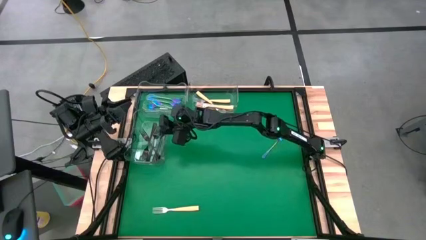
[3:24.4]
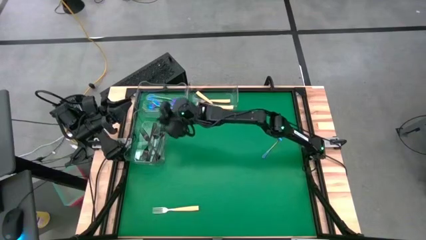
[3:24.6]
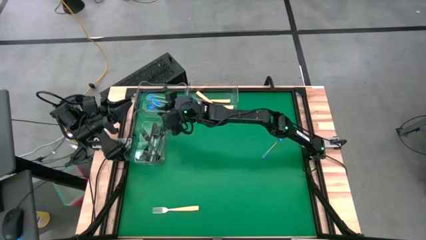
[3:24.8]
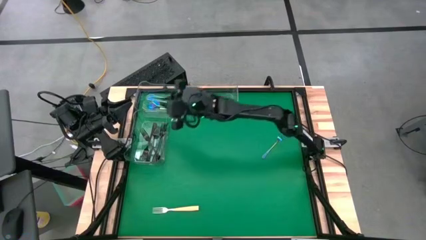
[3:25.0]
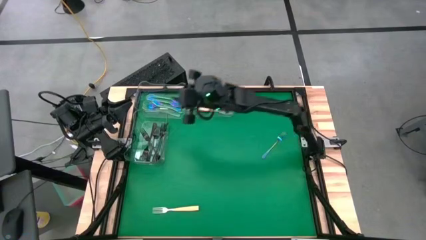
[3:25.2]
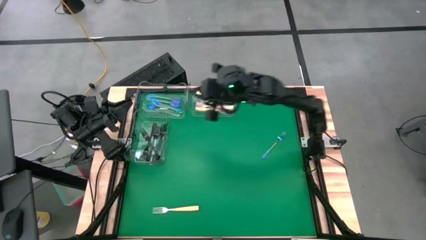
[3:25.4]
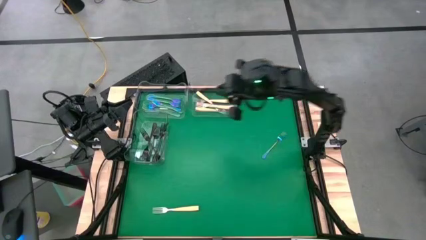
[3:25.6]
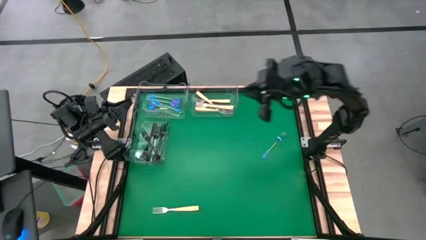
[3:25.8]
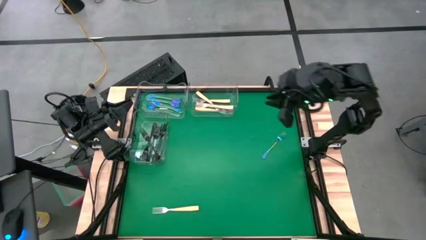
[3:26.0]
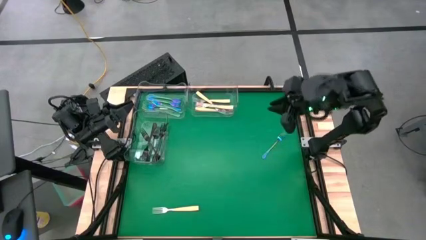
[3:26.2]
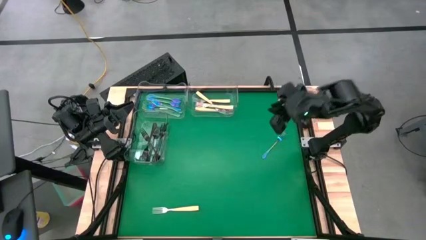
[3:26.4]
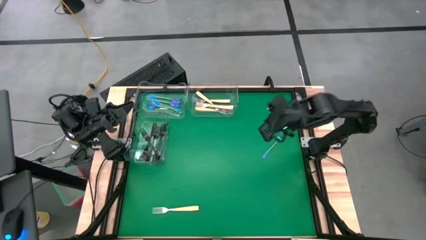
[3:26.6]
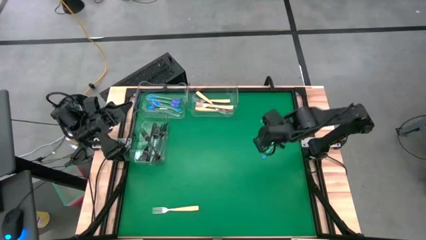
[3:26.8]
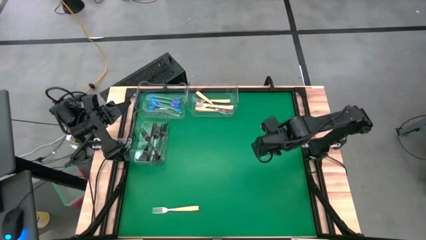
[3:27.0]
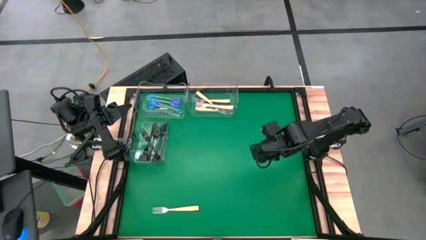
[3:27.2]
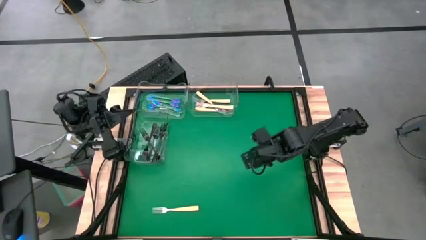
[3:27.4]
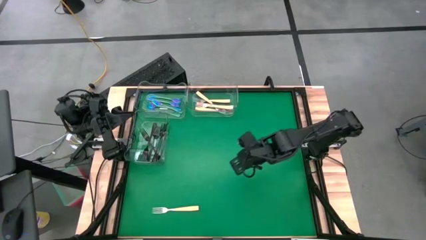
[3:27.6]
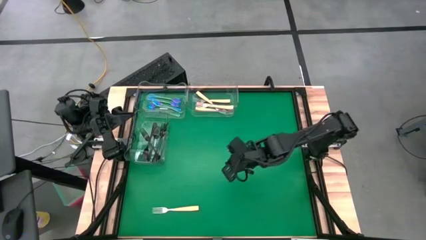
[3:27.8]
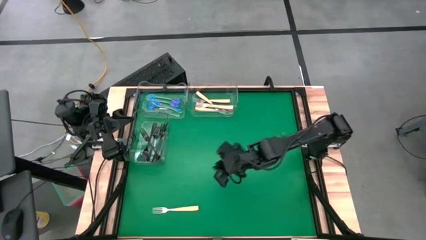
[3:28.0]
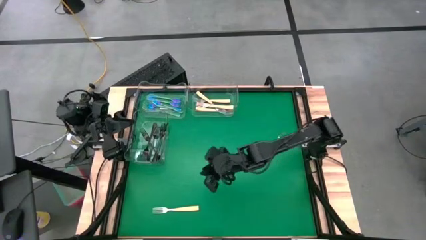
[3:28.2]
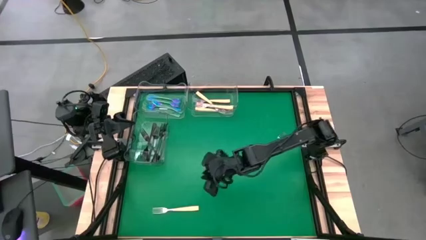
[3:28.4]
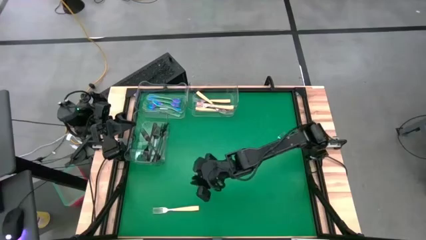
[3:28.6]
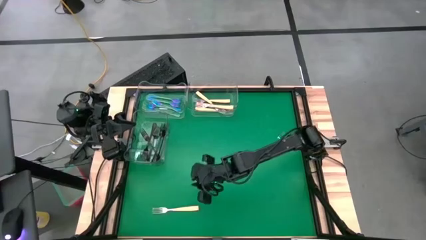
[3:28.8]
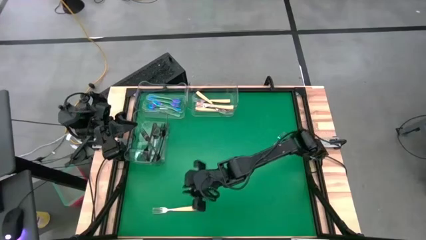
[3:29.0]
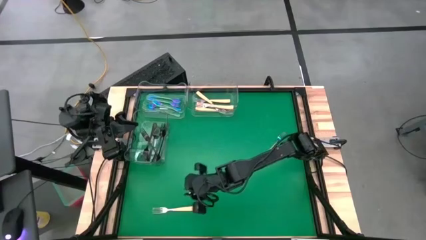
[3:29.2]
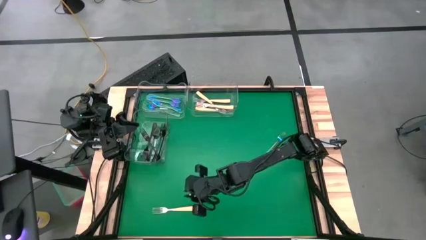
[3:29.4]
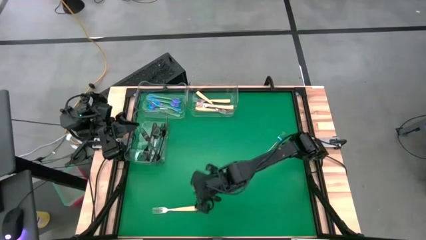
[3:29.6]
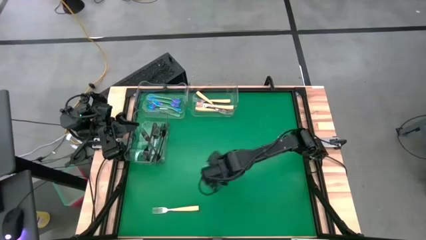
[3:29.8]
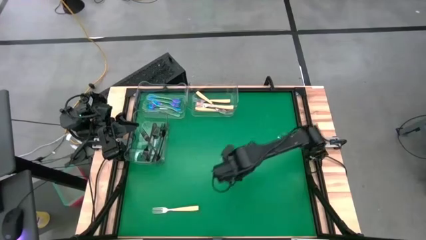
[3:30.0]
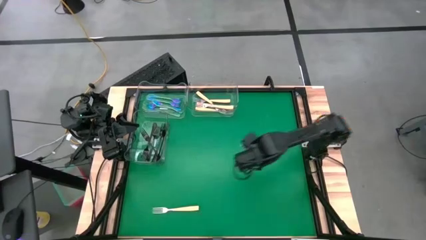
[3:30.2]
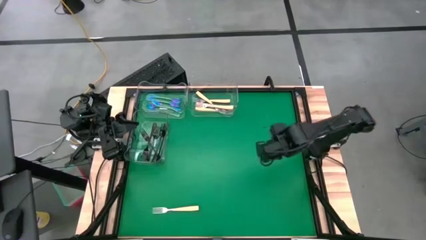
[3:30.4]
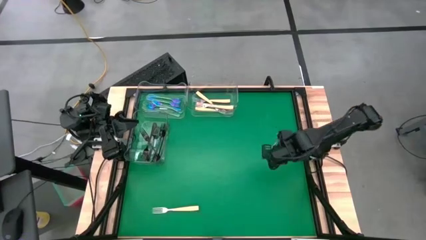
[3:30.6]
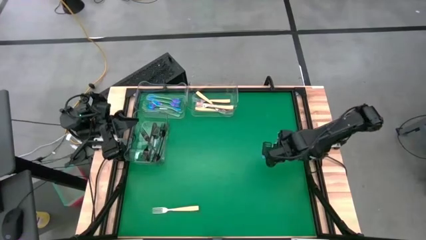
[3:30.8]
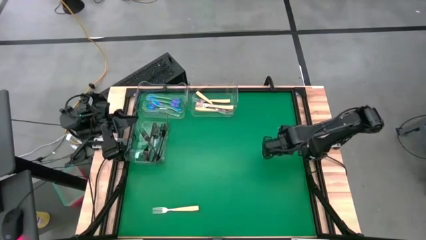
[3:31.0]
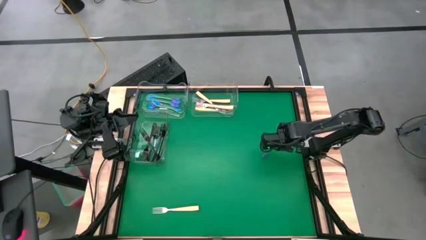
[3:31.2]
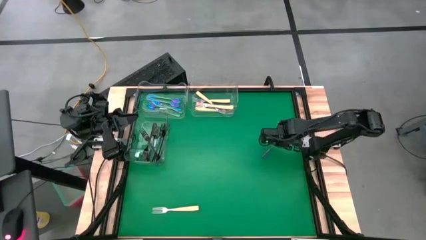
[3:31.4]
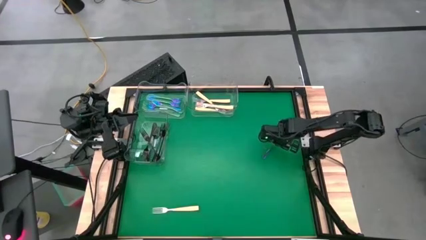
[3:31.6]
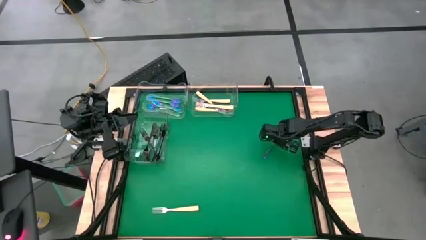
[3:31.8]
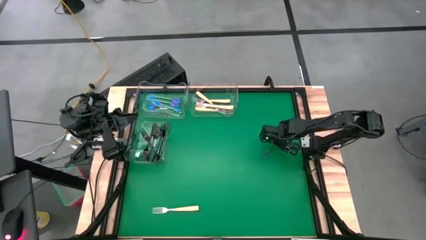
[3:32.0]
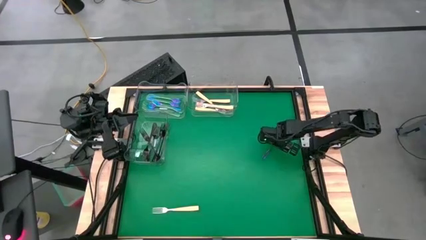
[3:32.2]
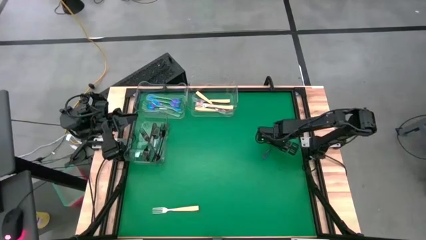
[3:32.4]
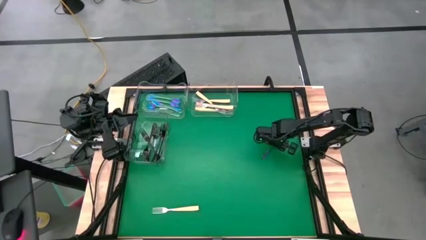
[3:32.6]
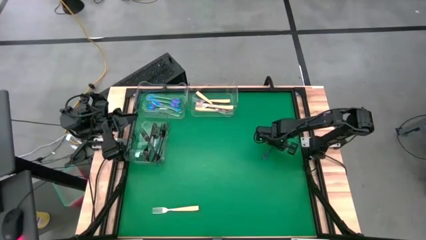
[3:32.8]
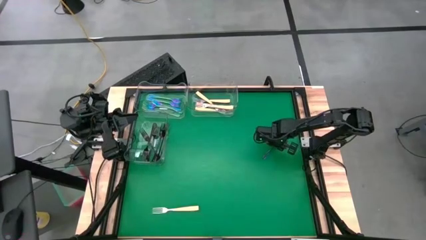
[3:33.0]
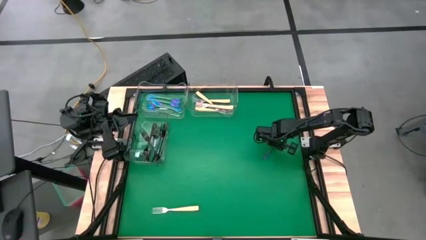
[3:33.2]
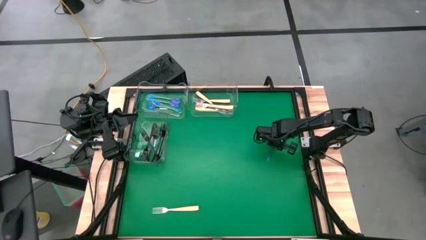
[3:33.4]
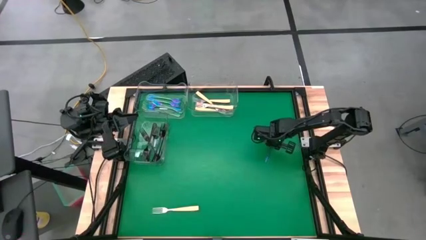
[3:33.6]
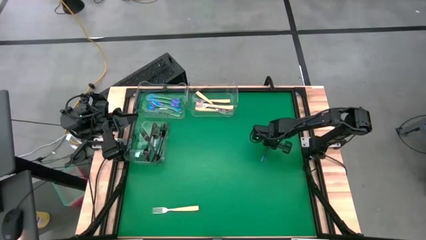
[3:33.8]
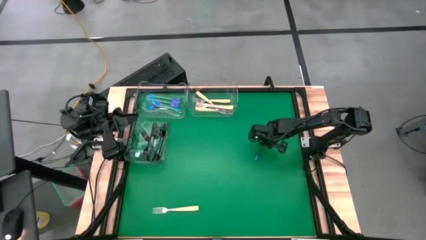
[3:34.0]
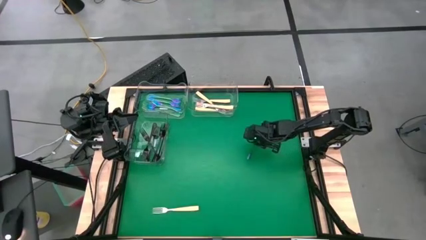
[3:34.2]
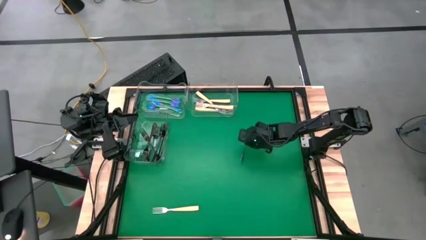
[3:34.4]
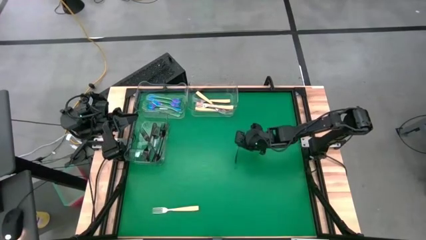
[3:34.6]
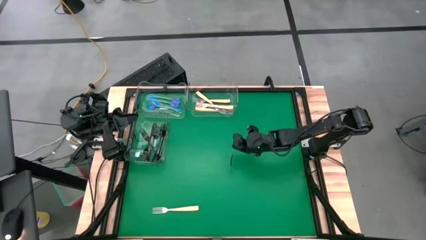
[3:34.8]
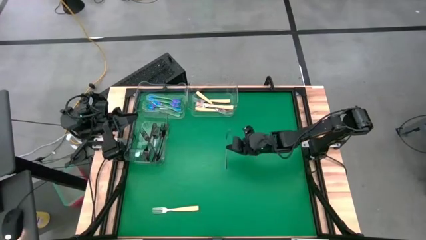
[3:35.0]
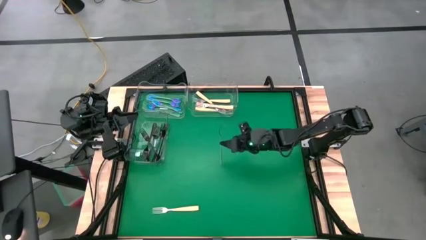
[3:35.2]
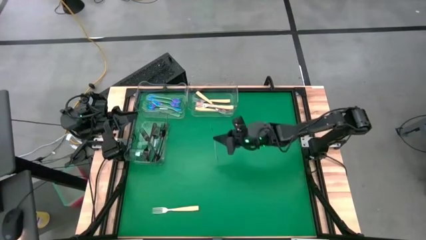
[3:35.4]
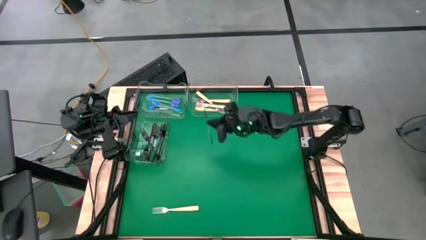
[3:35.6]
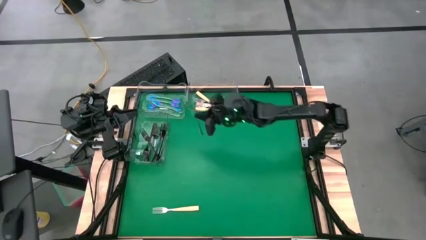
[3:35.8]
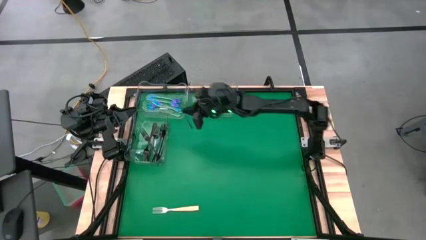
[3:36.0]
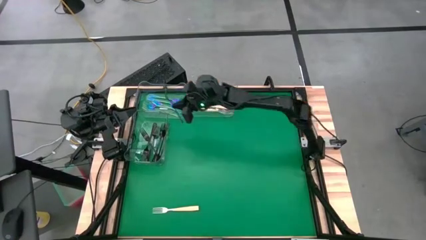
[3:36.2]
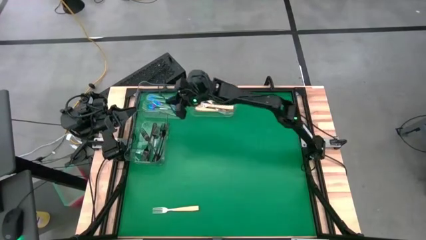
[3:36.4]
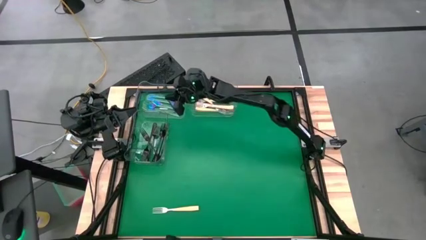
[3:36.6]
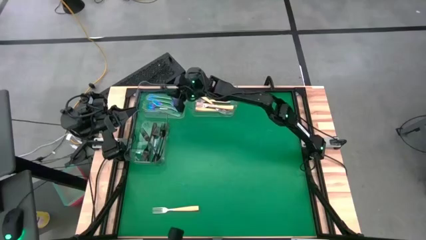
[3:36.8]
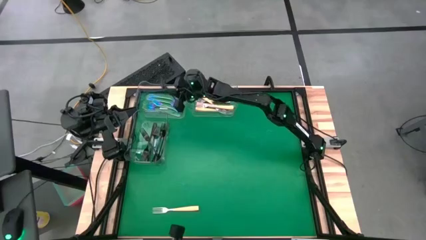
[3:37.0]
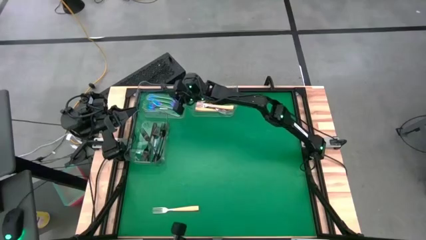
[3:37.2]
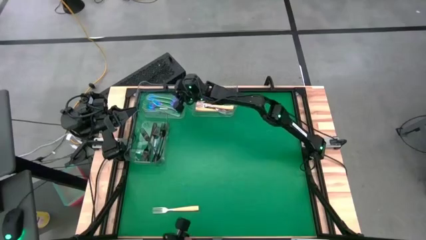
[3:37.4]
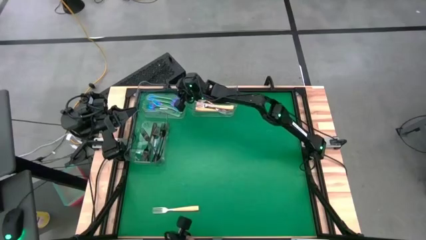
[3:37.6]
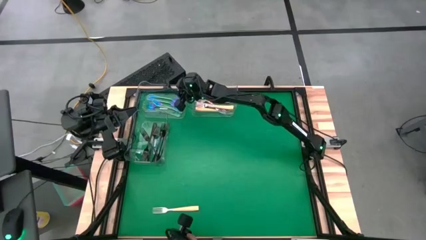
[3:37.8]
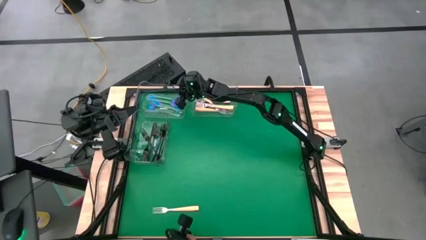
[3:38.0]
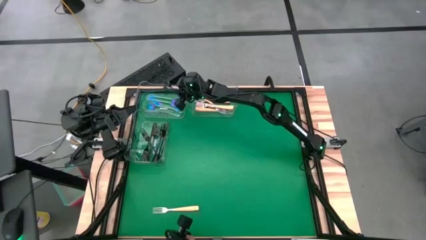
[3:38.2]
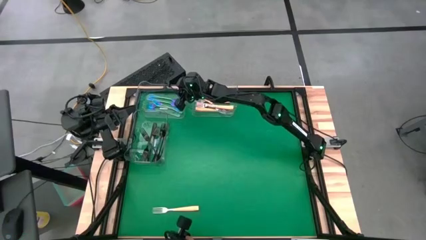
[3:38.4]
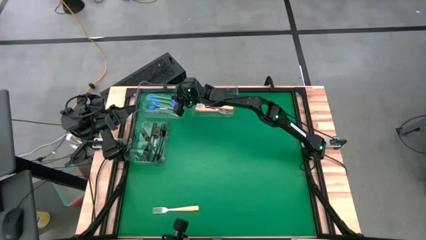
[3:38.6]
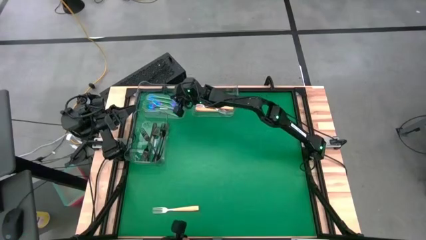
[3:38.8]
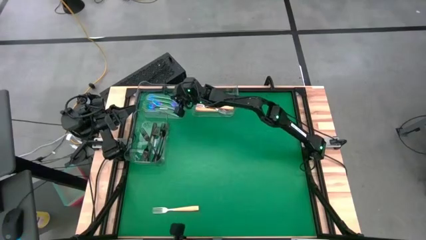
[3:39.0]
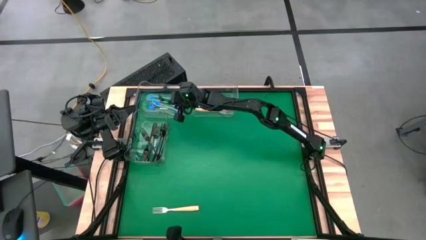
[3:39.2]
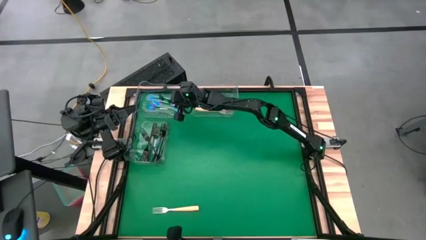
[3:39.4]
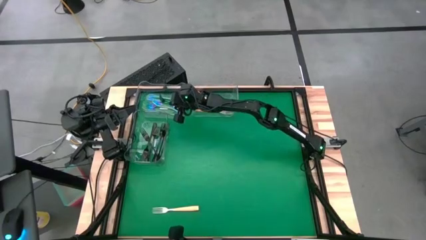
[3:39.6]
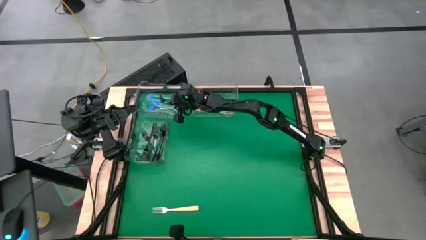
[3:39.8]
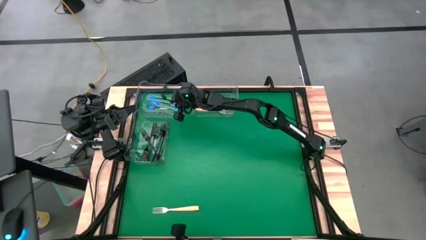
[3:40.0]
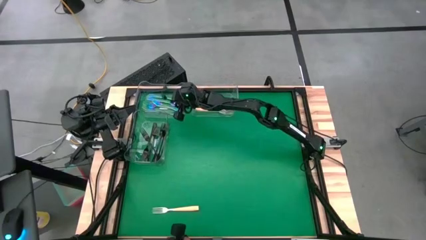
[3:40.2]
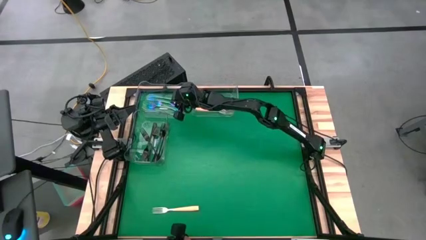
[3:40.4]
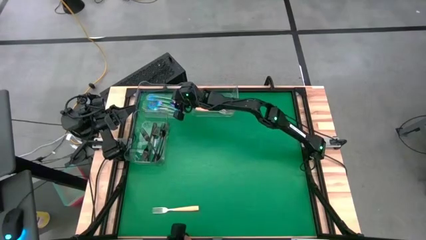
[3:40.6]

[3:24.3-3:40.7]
Task: Sort silverware by color (type)
Put the iridescent fork into the top left transparent bin
